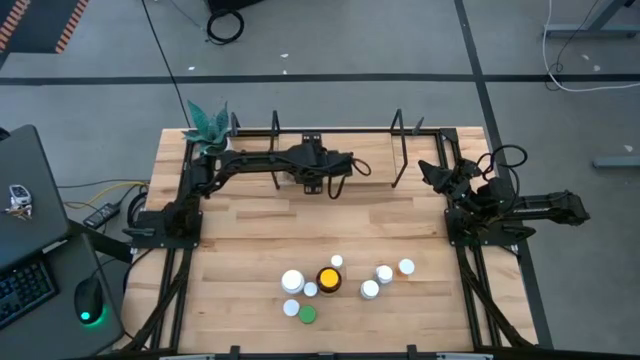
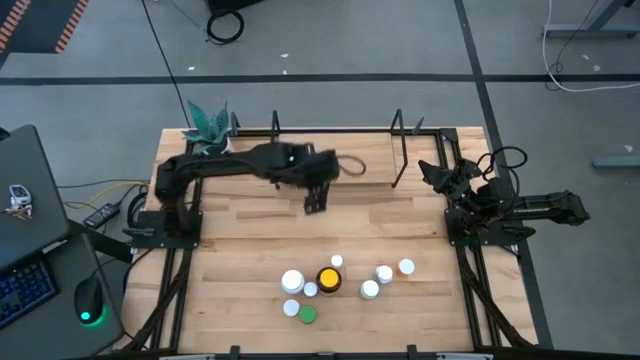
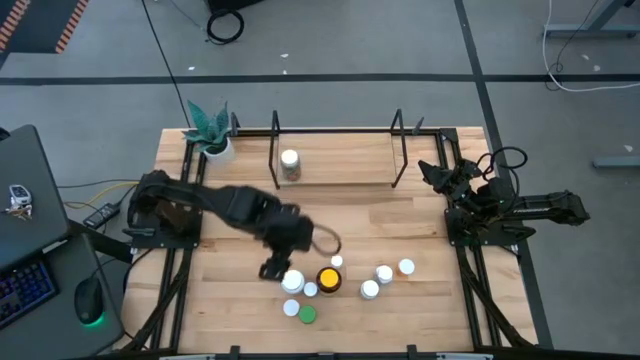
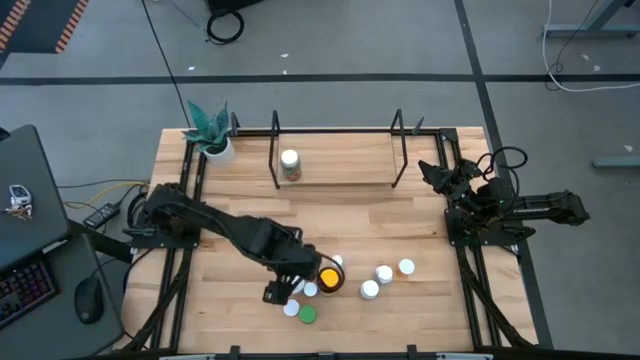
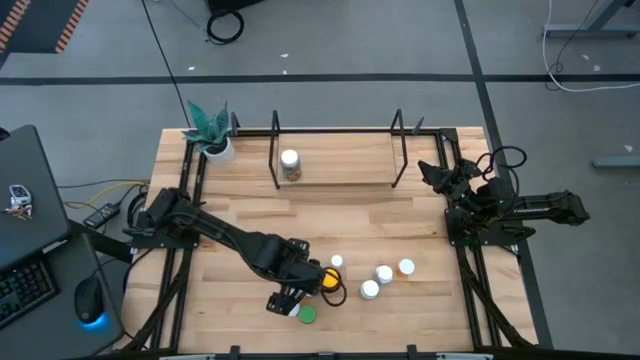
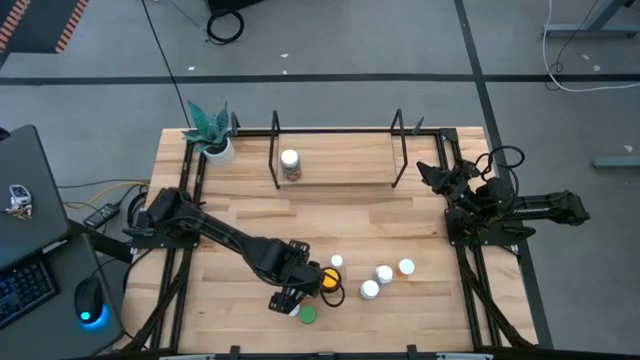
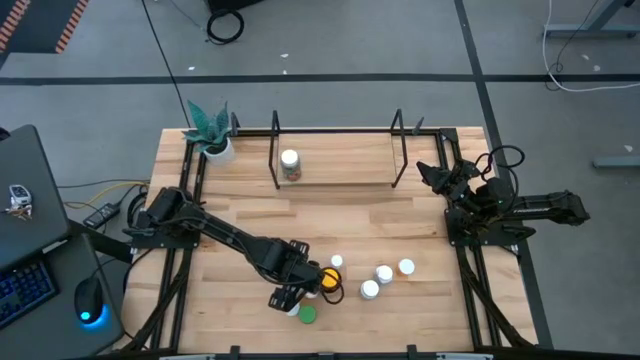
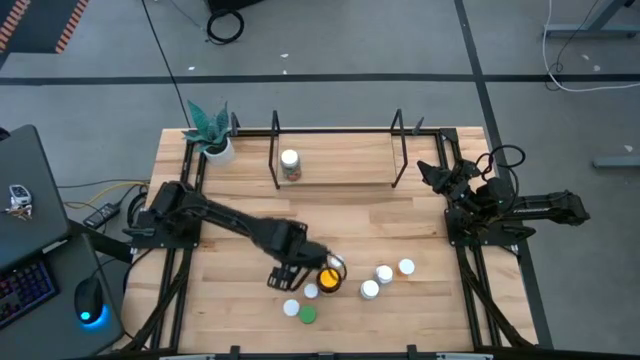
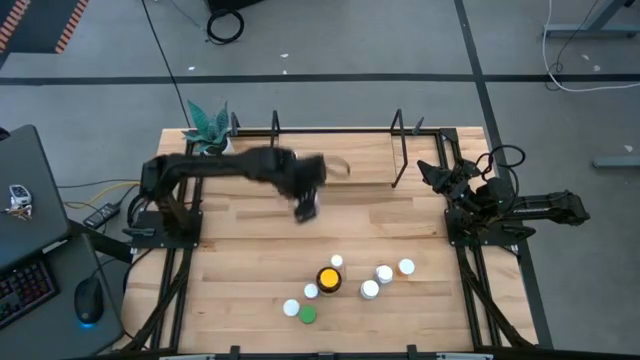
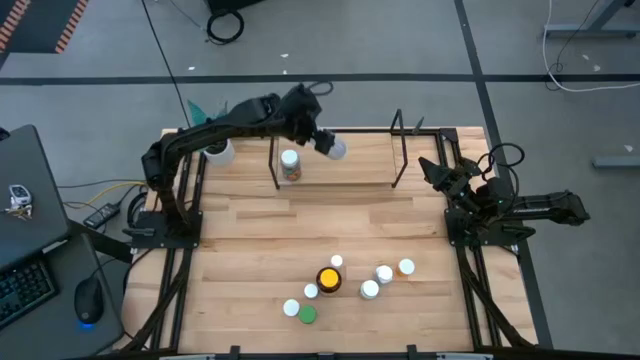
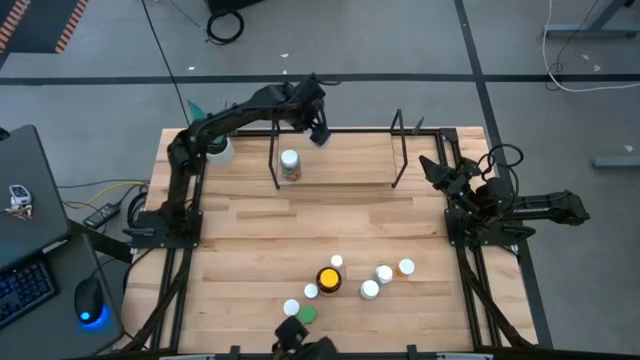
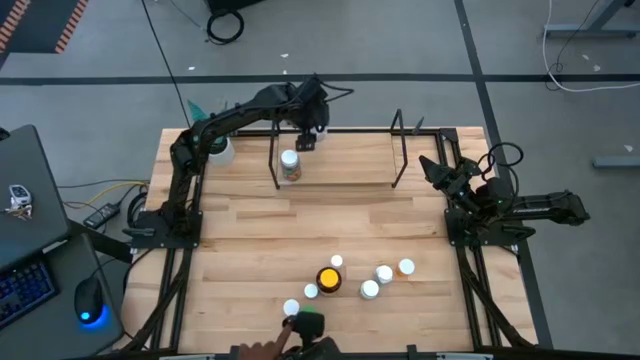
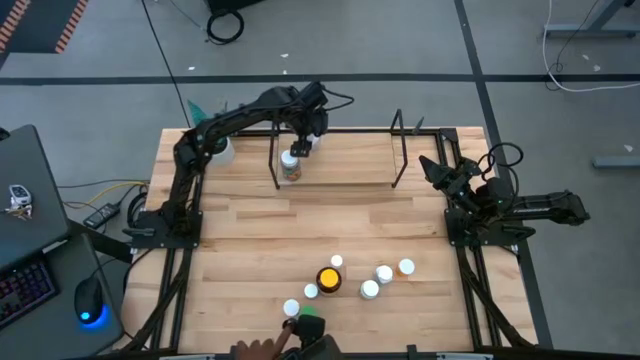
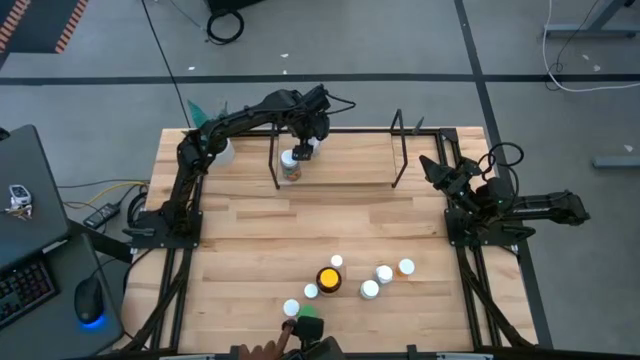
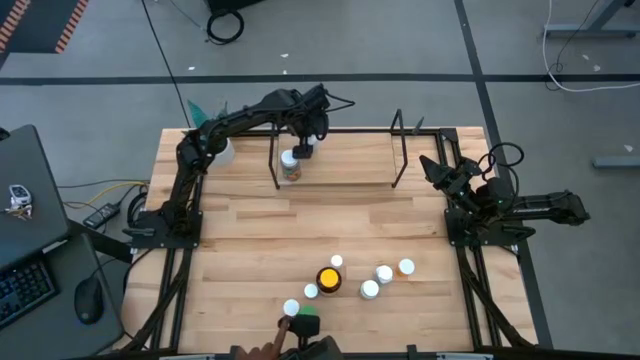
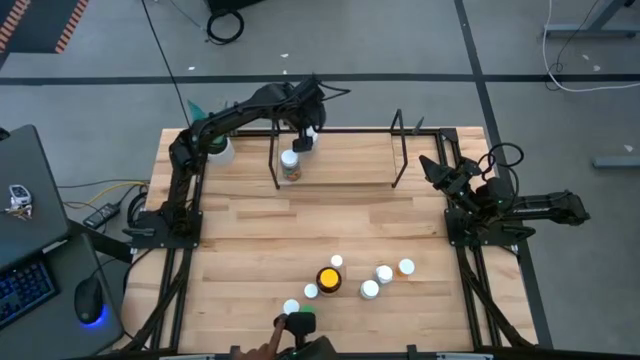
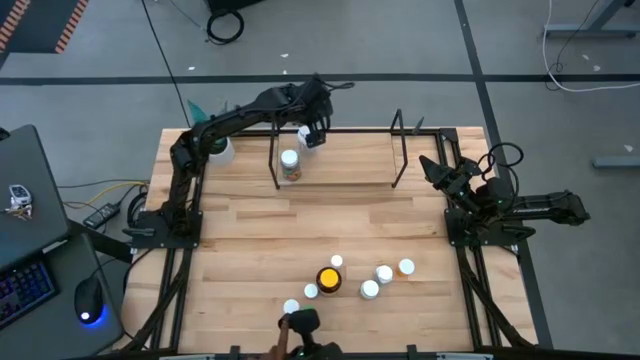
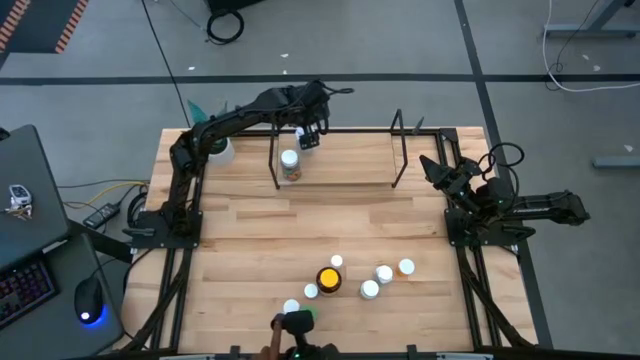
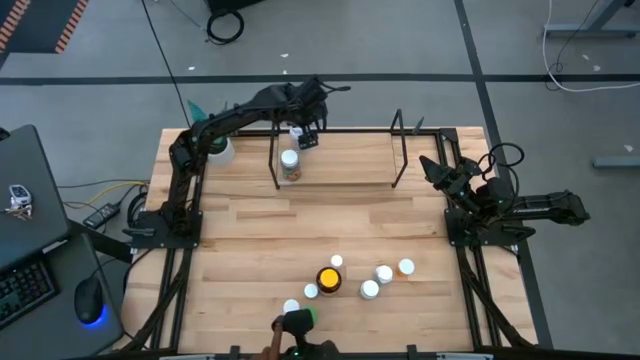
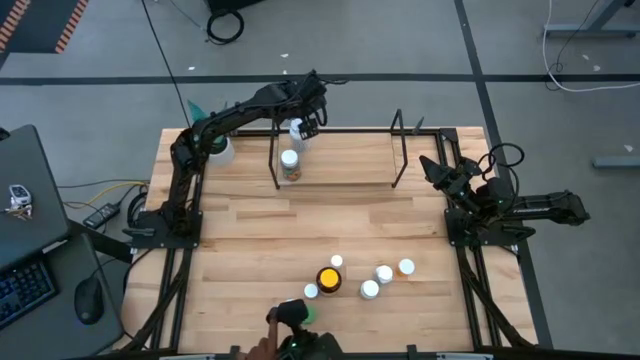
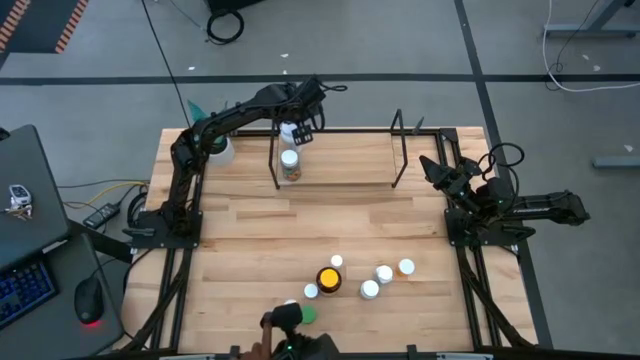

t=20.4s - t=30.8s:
Task: Pick and place medicine bottles onto shelf by color
Put the red pill bottle on the shelf

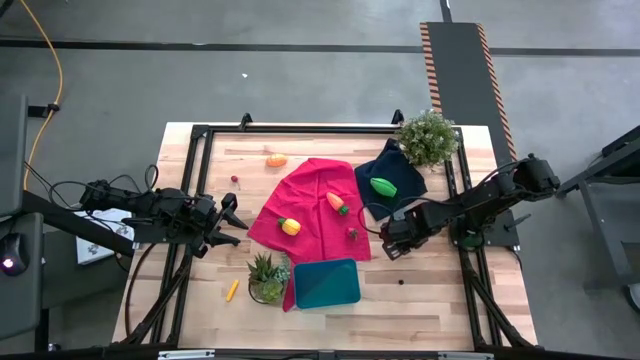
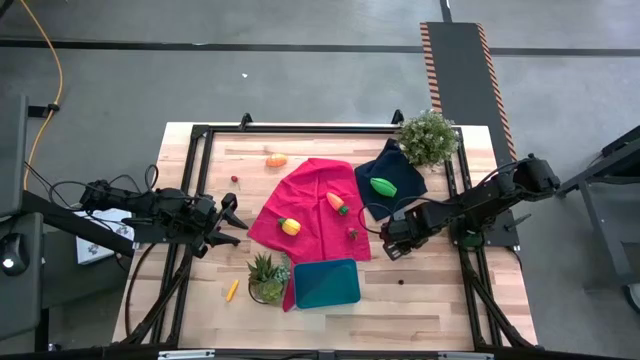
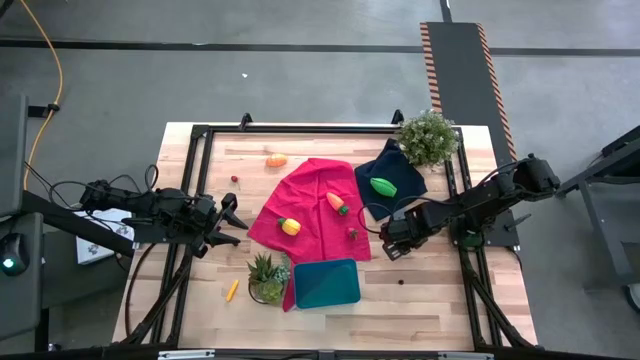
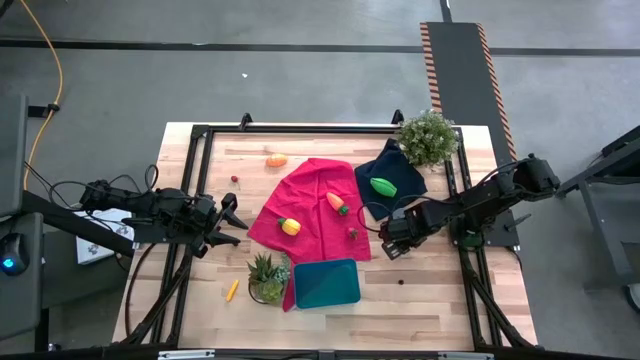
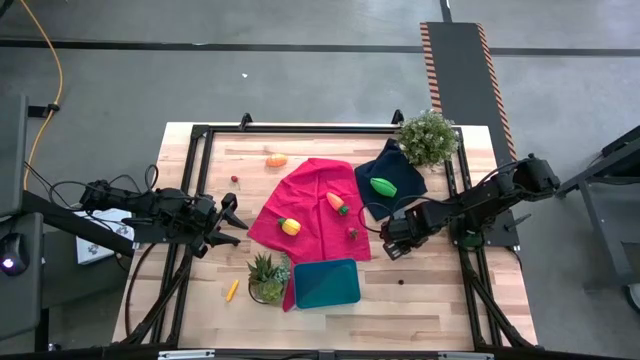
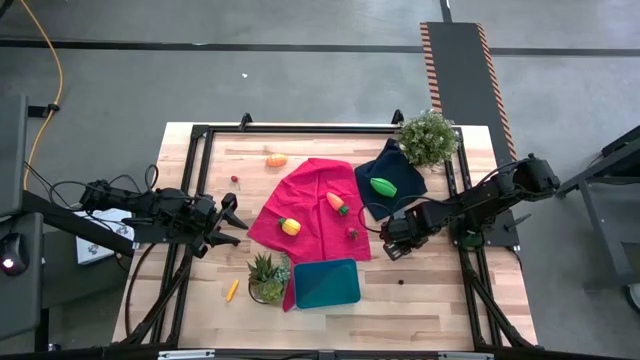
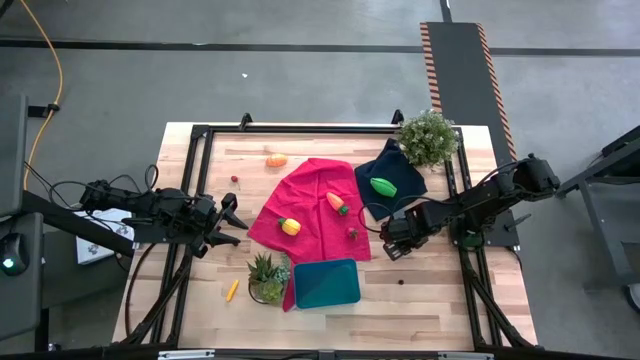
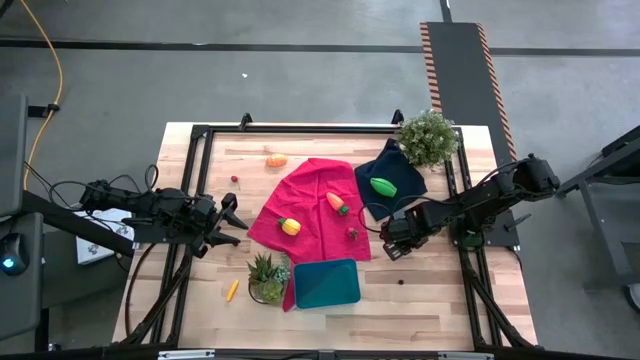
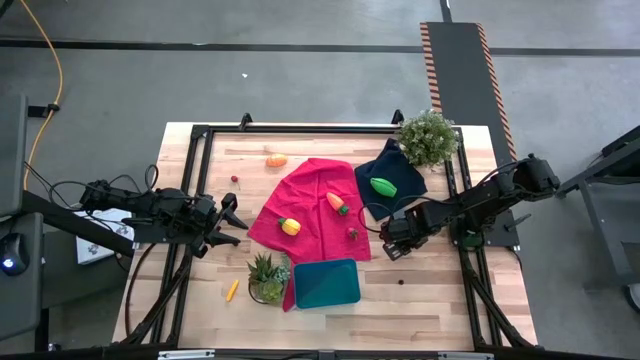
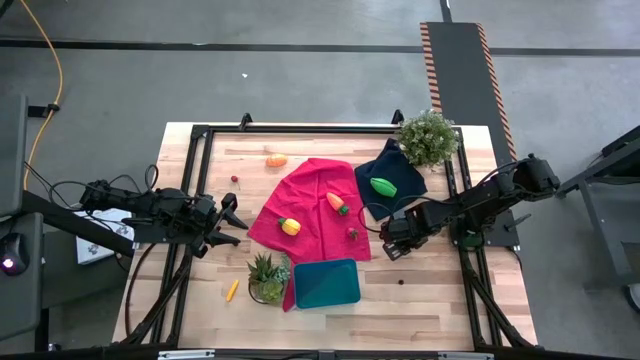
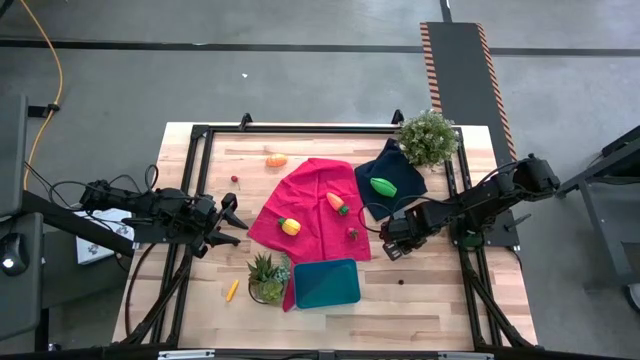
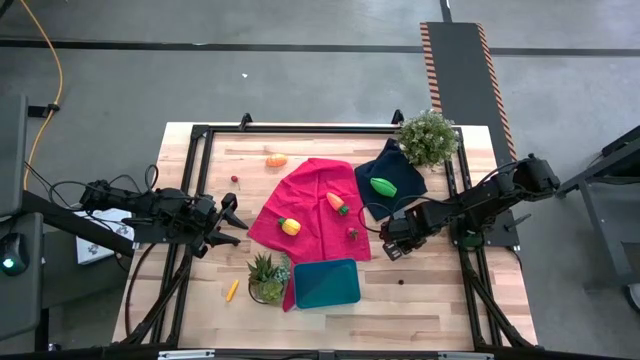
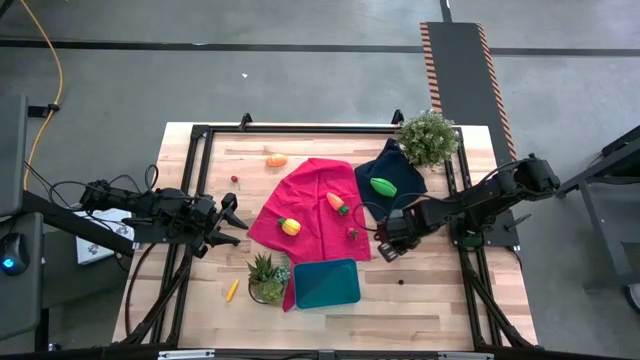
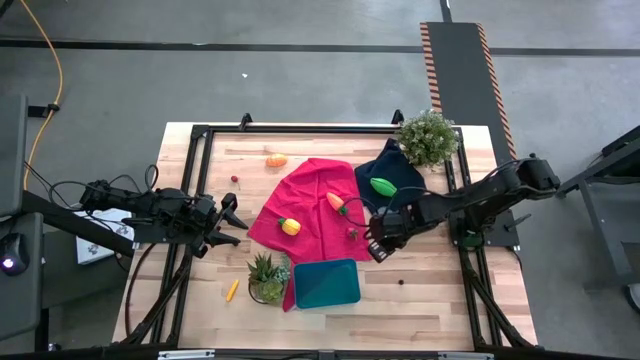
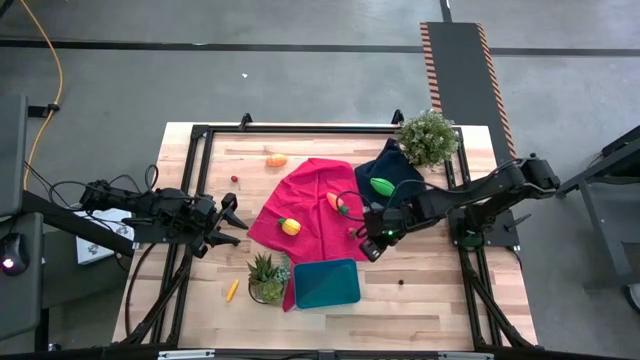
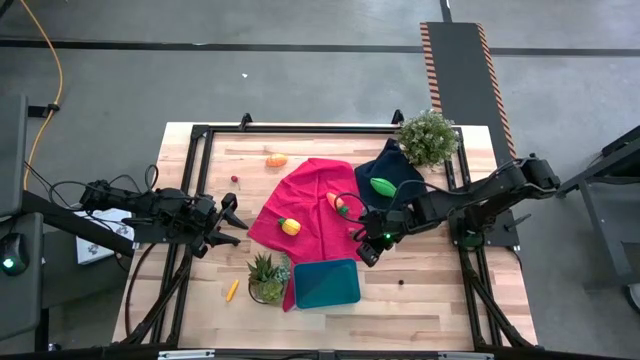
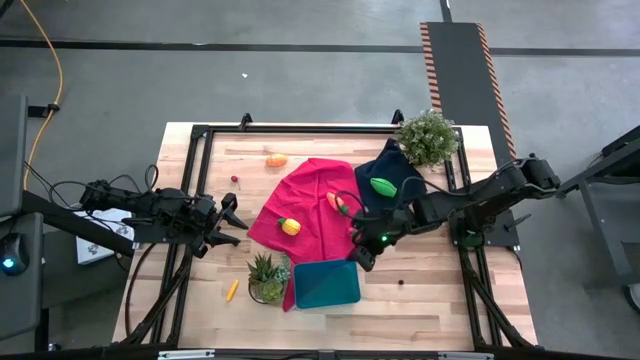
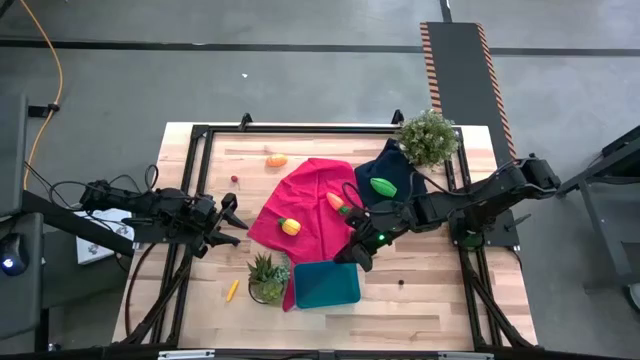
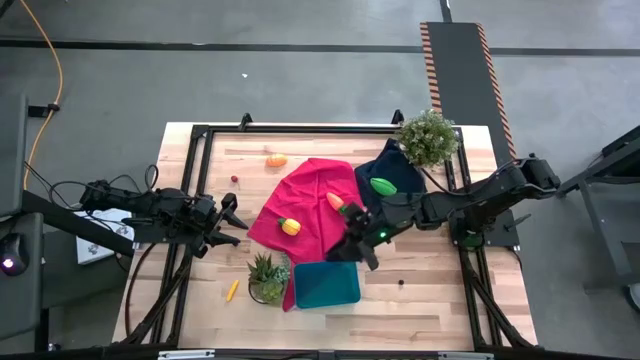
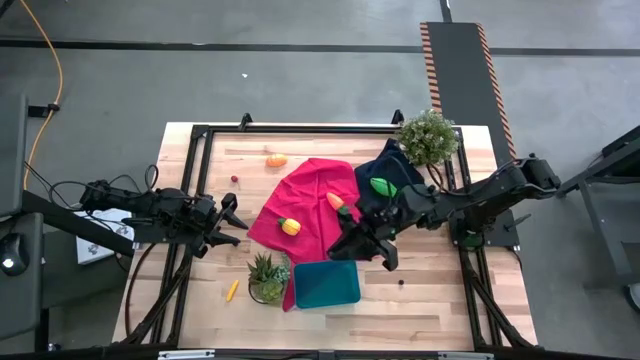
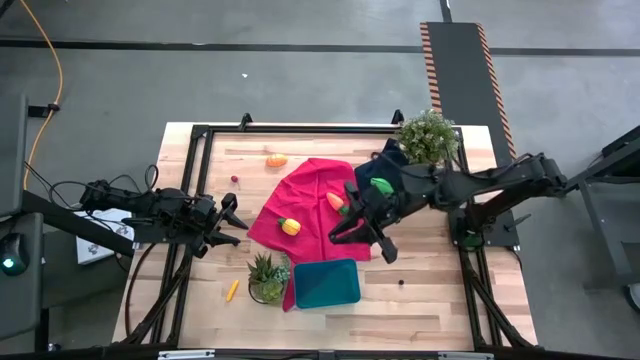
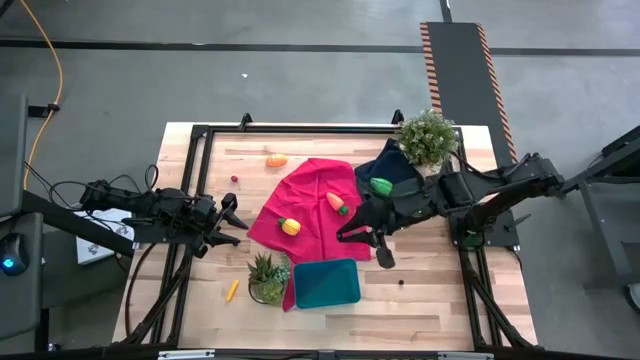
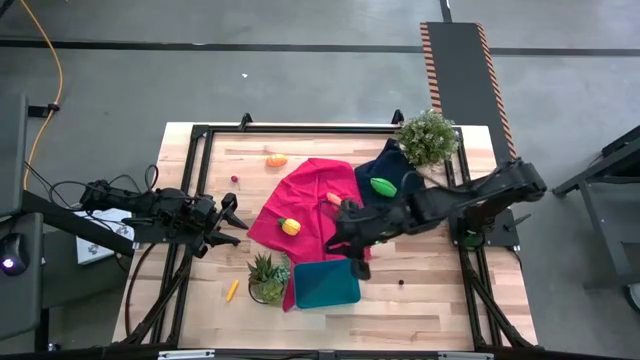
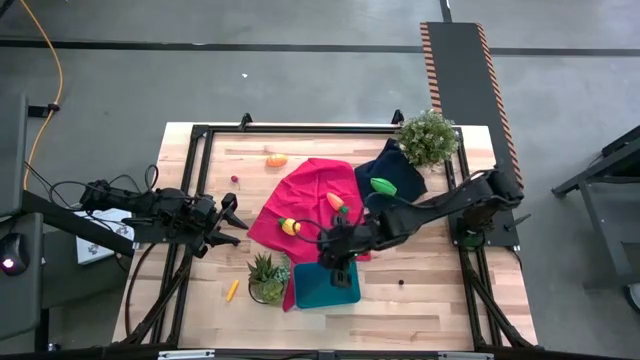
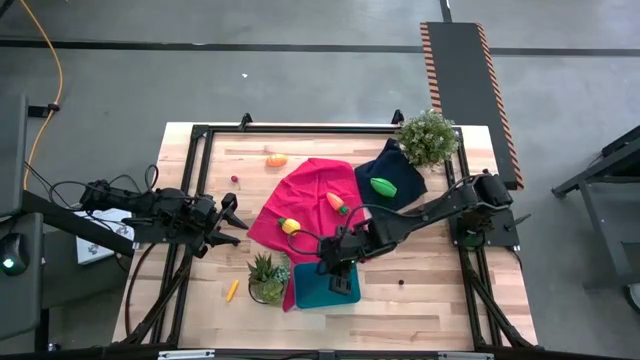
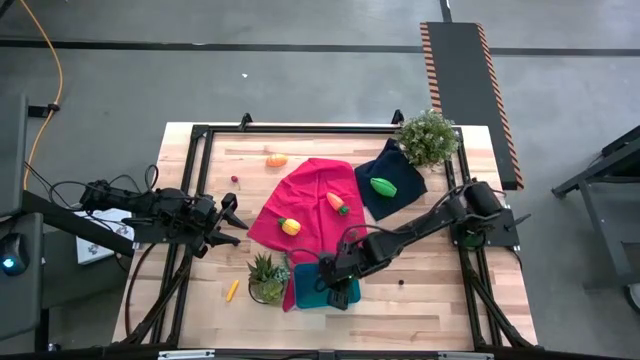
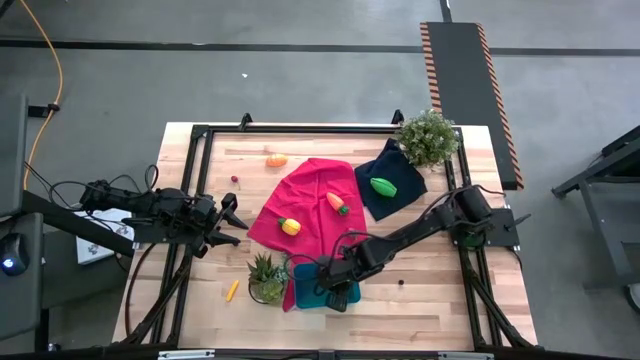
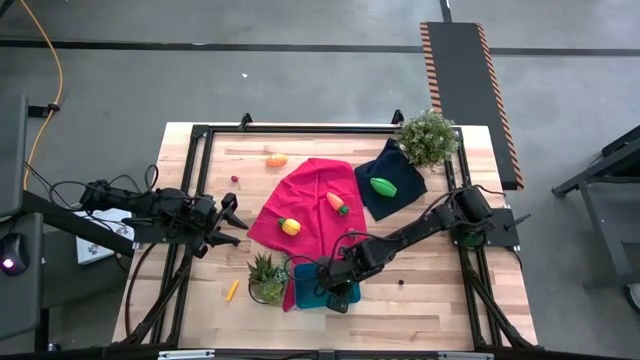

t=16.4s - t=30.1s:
Task: Pick and placing Produce into tupperware
Put the top blue berry into the blue bin
